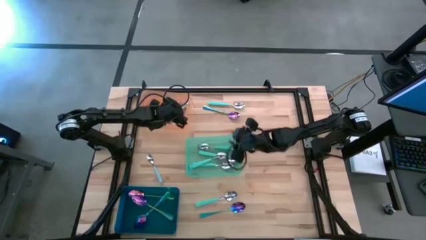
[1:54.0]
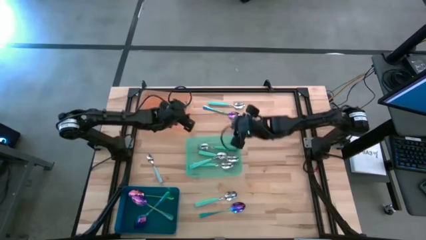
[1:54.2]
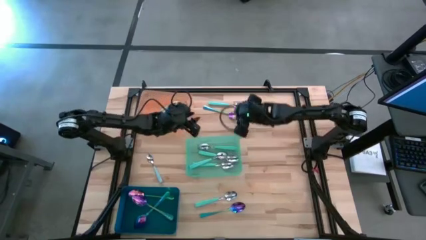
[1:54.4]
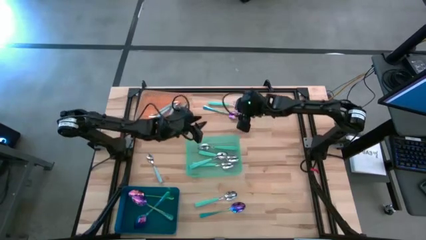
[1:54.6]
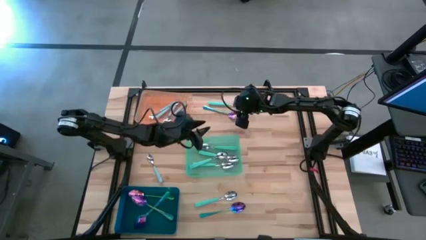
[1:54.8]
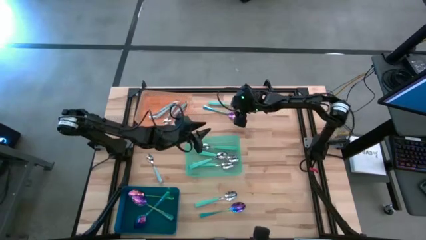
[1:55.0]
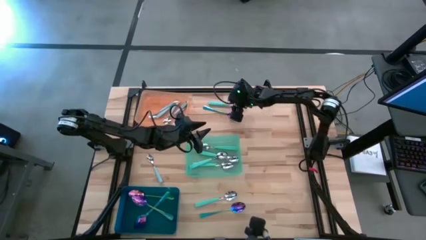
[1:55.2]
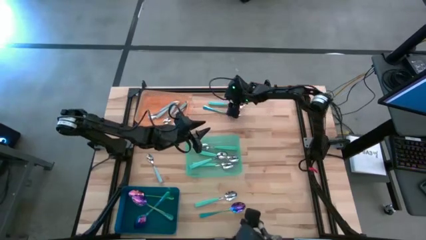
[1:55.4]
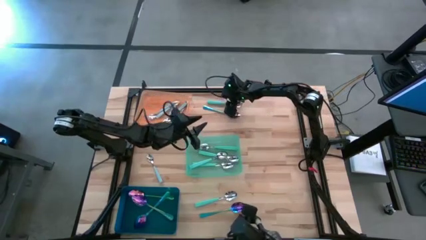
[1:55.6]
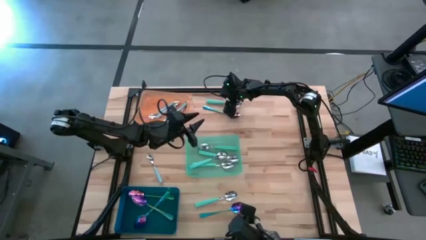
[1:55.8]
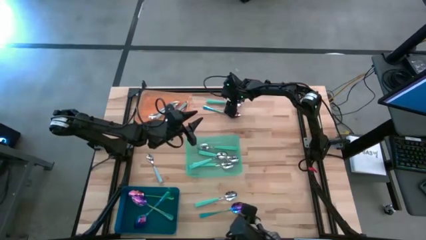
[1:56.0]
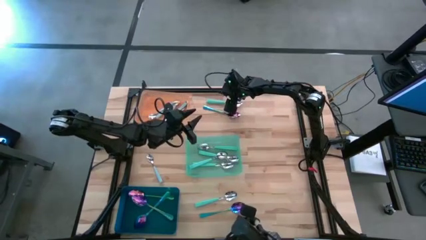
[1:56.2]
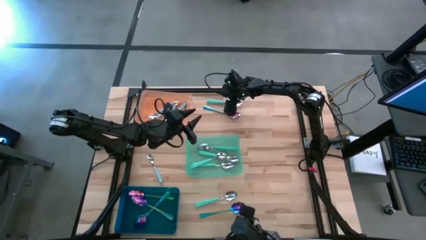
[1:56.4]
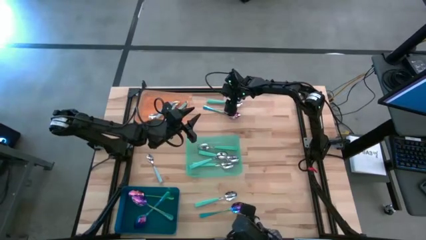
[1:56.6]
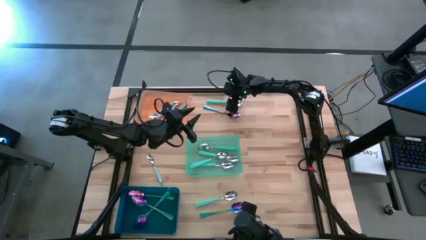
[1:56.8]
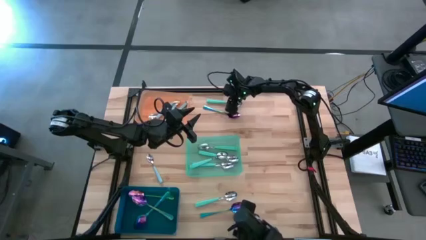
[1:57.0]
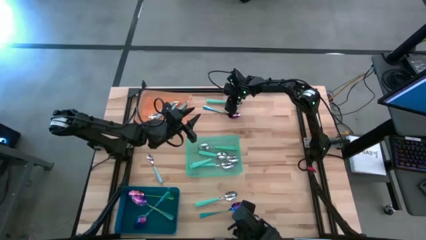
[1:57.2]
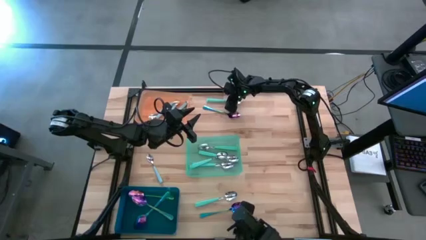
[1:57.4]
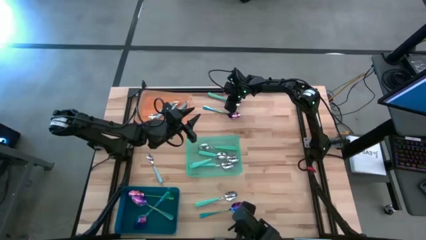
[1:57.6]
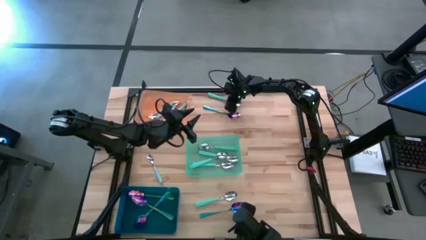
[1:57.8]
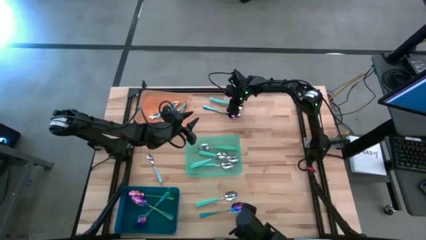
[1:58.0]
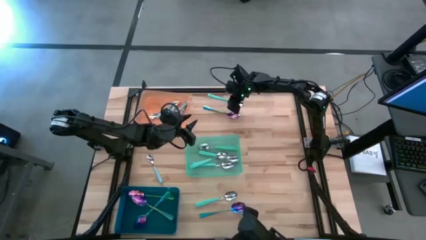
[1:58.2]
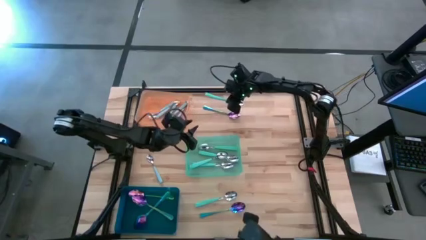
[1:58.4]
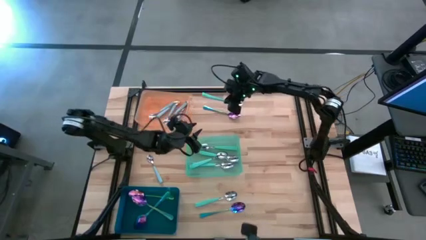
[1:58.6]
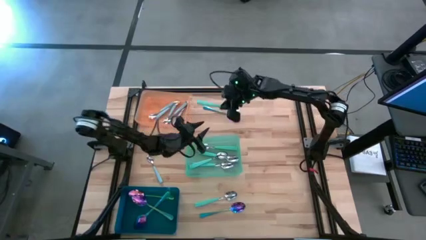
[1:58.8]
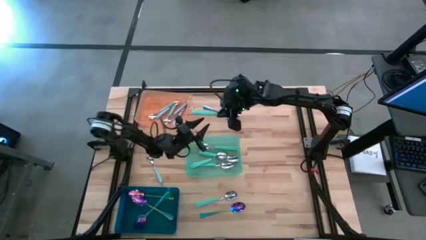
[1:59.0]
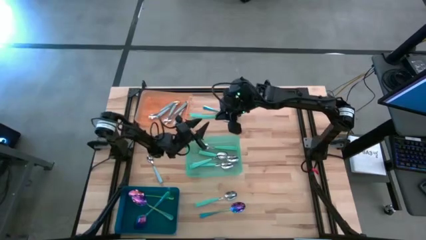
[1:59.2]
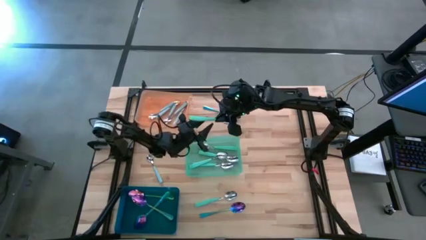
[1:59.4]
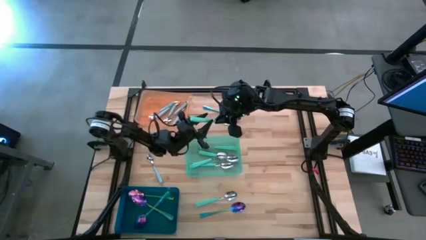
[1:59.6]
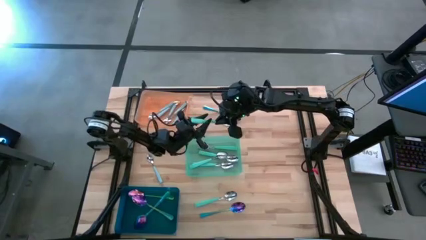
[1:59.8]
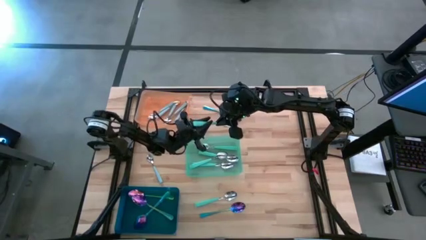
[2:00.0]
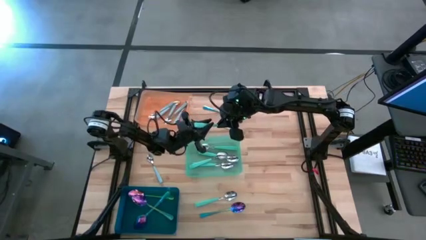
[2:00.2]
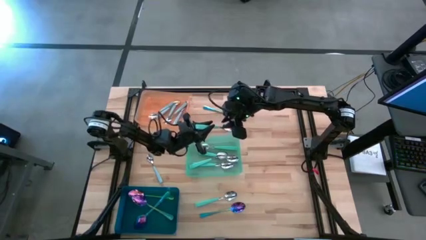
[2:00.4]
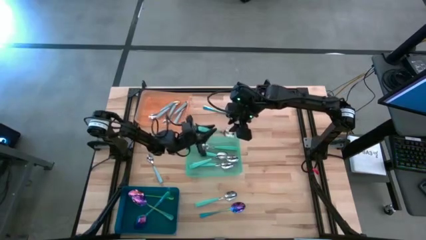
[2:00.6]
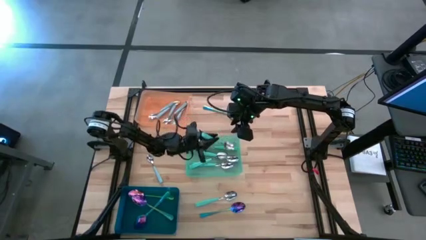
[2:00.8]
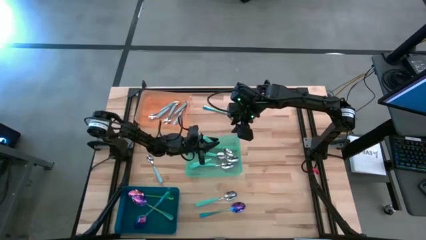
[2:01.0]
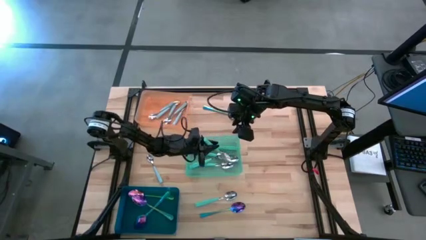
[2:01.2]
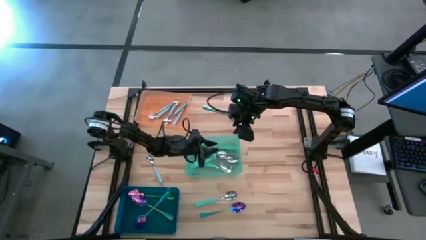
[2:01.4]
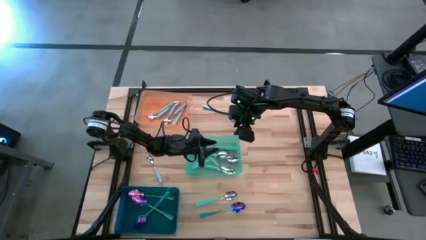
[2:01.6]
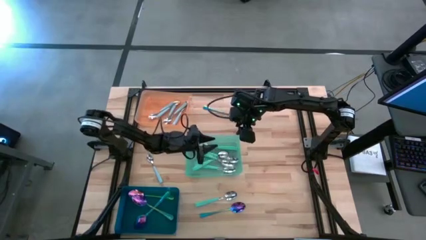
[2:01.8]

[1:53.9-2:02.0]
Task: Sort silverware by color (type)
Put the green spoon into the green bin

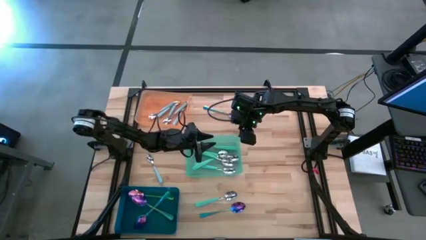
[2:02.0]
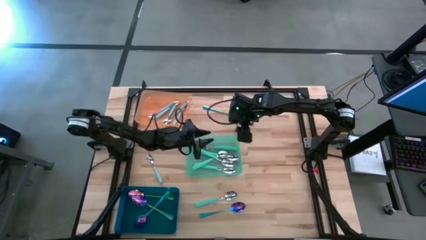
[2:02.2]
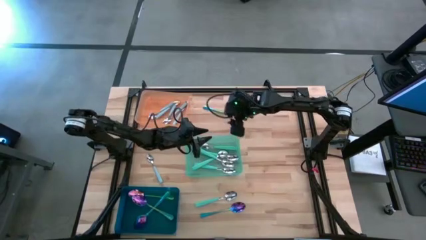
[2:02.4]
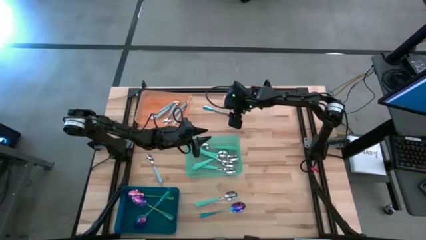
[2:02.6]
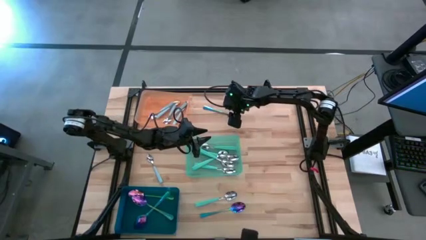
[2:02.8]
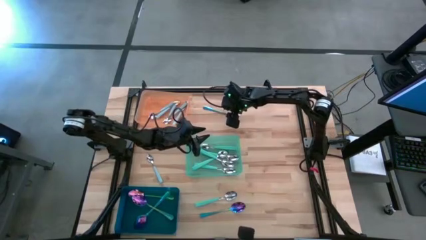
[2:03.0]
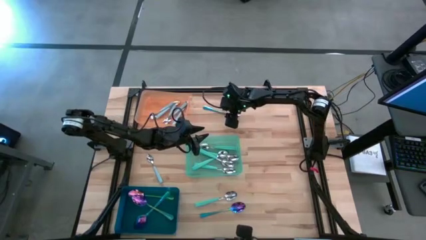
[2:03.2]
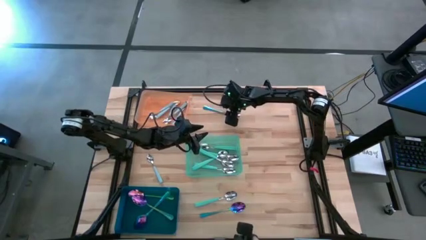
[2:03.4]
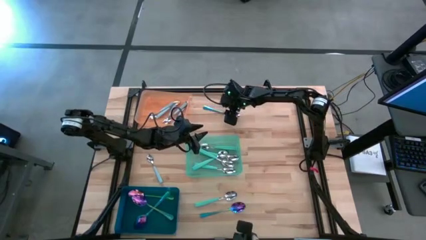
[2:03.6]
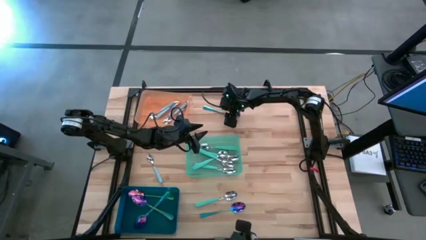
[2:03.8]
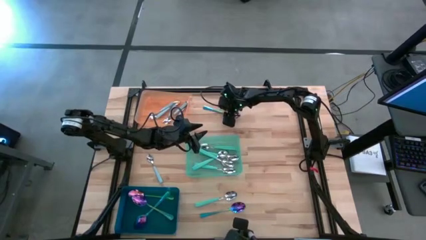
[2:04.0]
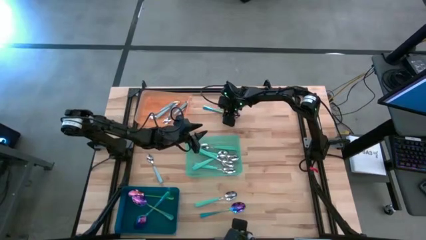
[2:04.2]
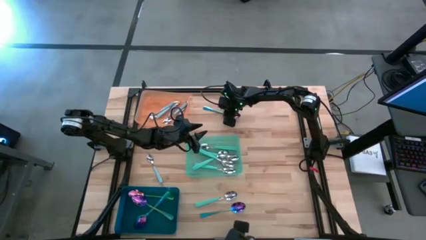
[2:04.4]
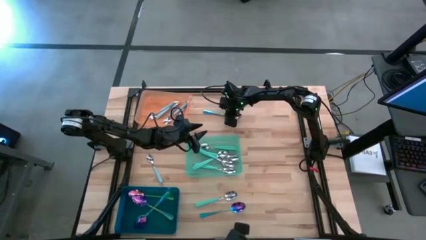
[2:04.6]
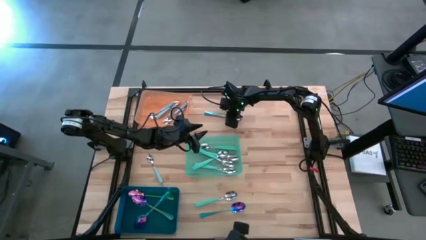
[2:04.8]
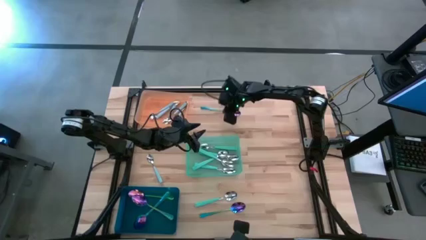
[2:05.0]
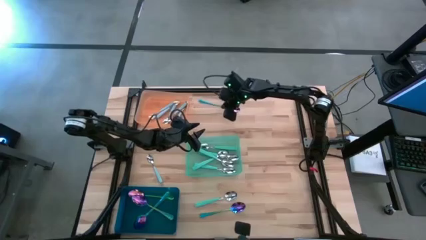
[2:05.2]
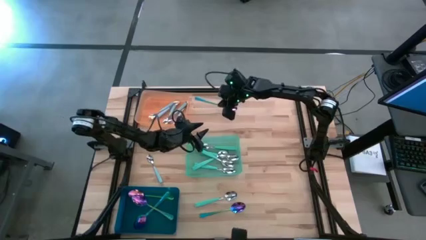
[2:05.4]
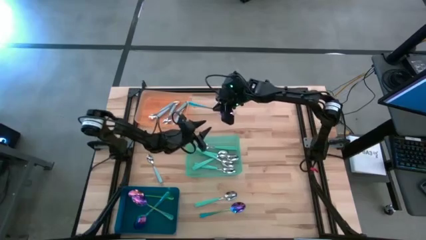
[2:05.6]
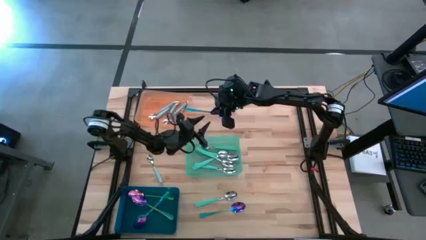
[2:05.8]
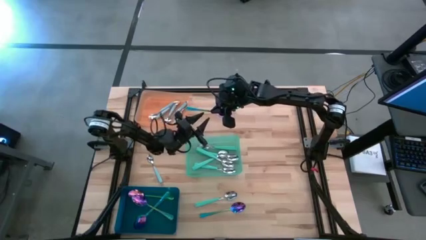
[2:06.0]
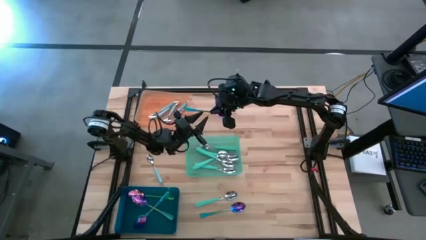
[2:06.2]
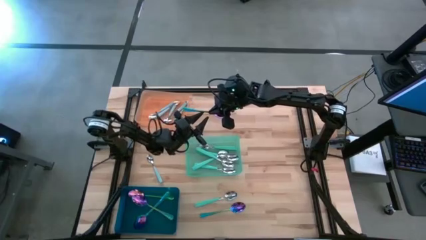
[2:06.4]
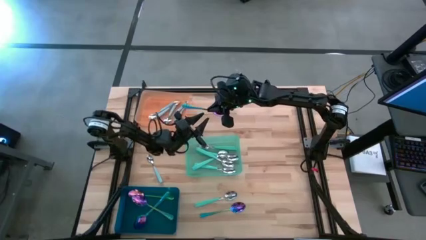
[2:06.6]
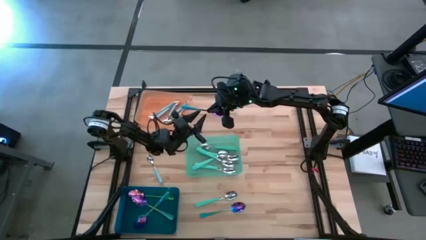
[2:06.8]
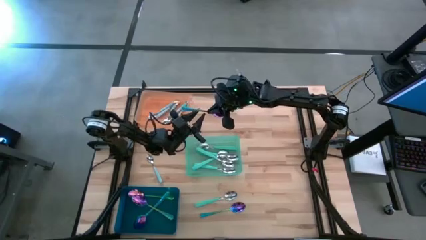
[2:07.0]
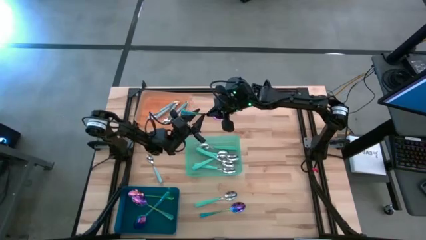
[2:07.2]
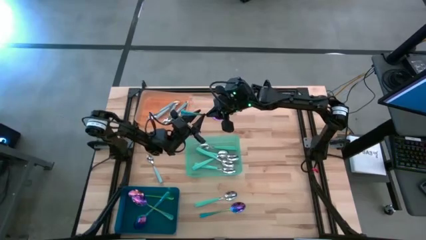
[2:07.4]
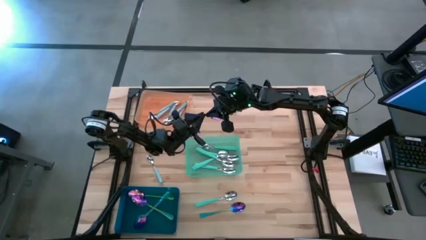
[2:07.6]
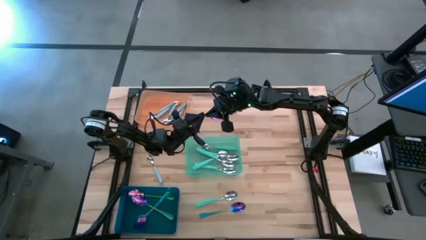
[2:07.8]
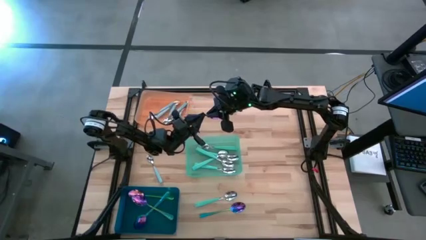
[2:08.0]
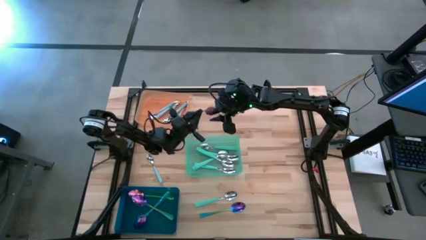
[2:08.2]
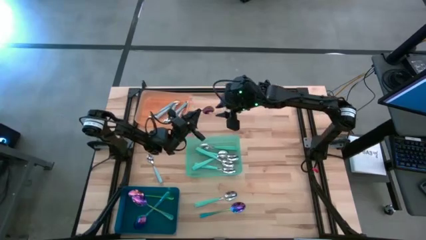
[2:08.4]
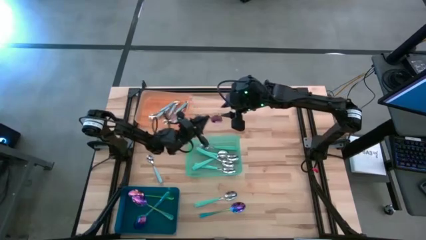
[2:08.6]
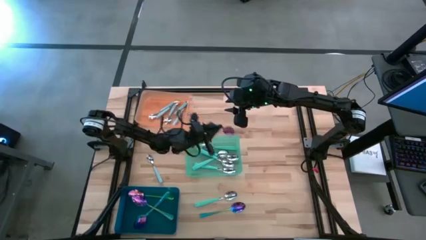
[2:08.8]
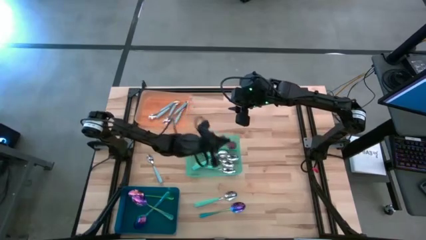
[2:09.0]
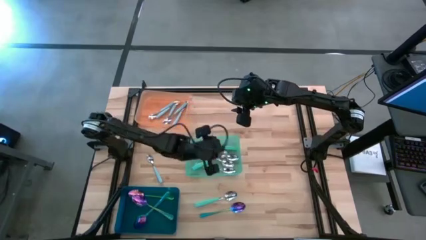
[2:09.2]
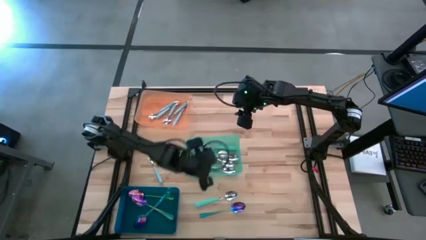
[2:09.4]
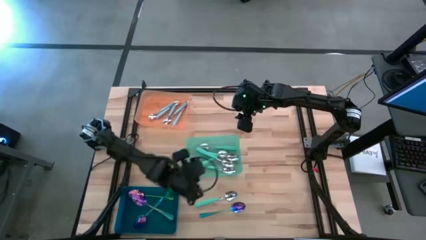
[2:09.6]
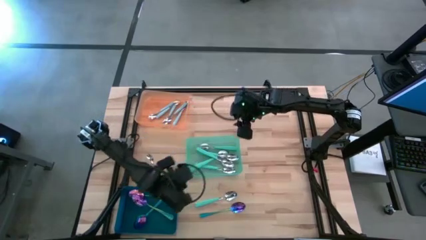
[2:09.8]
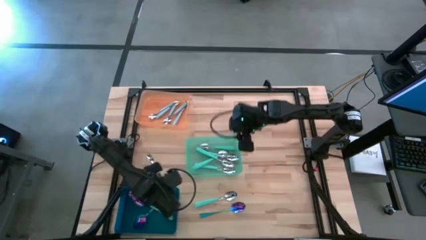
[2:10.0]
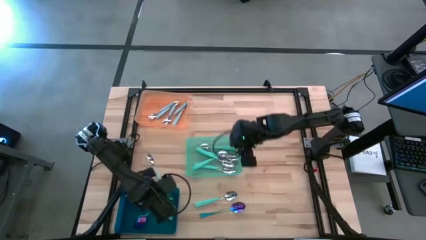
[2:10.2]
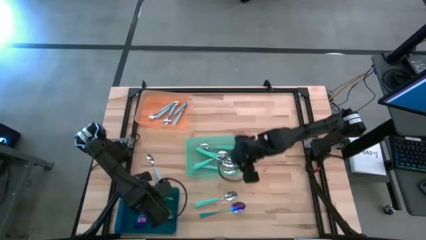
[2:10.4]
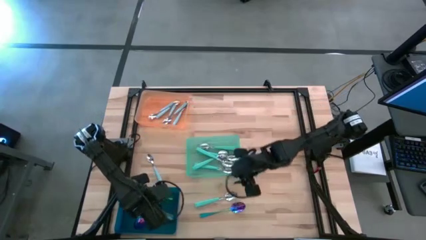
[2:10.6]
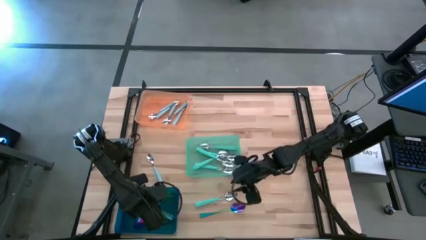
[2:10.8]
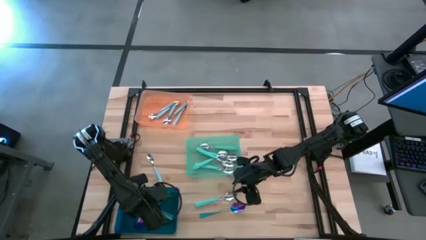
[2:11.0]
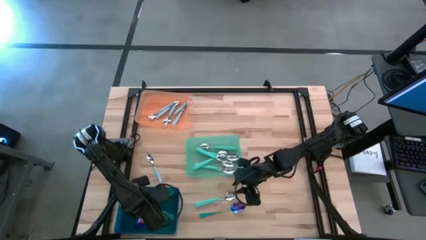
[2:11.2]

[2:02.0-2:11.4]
Put the iridescent spoon into the blue bin
